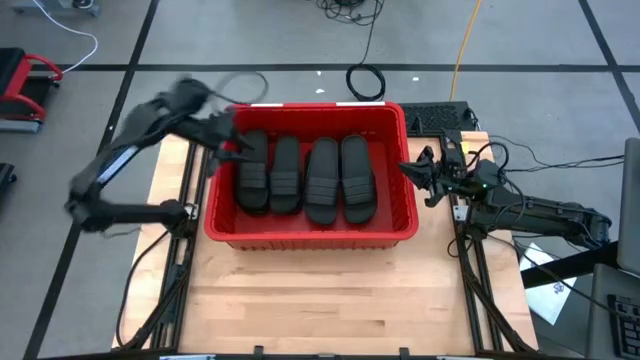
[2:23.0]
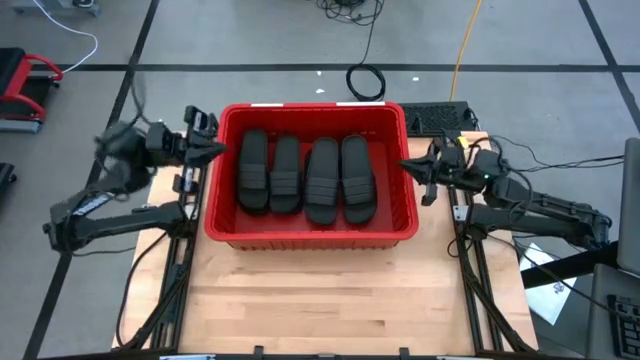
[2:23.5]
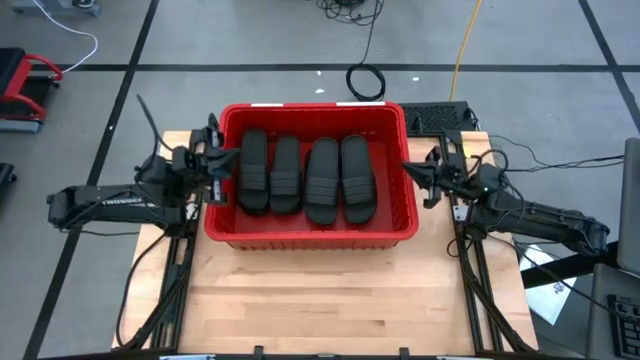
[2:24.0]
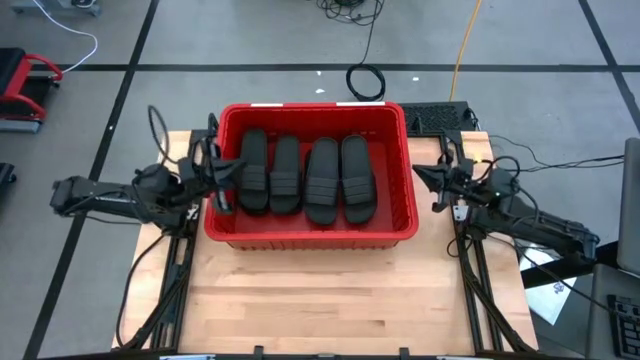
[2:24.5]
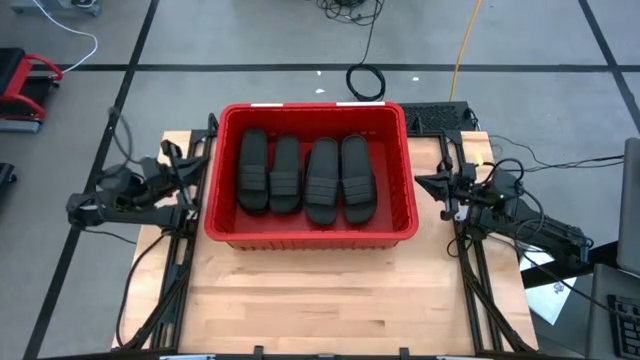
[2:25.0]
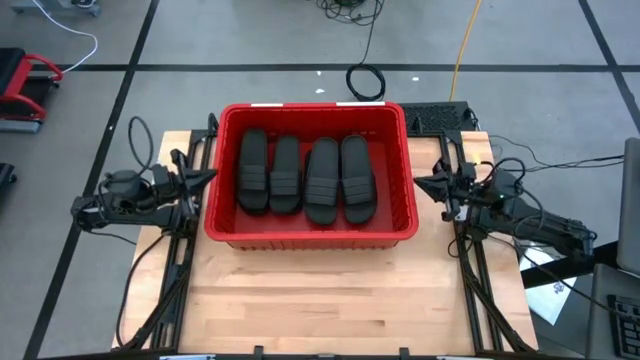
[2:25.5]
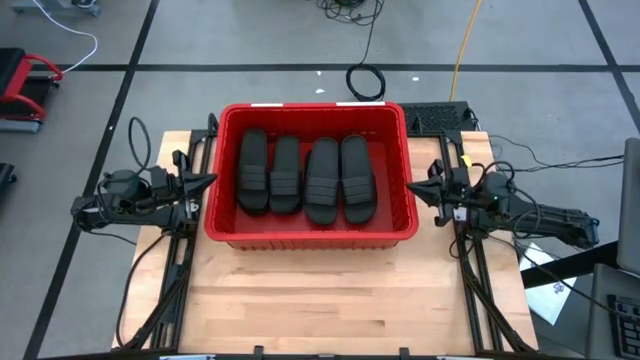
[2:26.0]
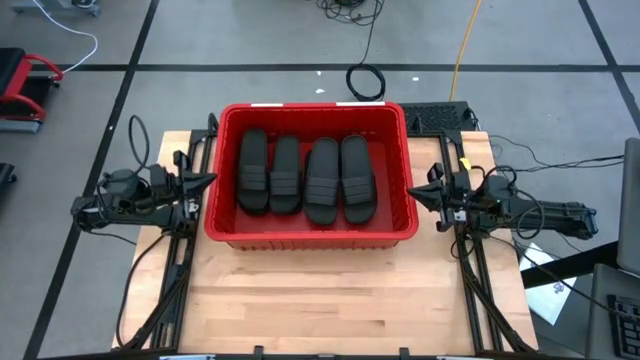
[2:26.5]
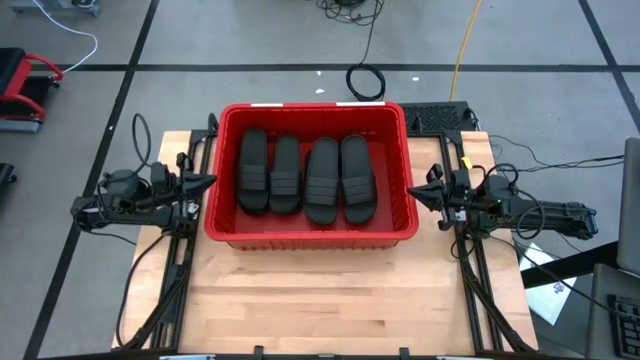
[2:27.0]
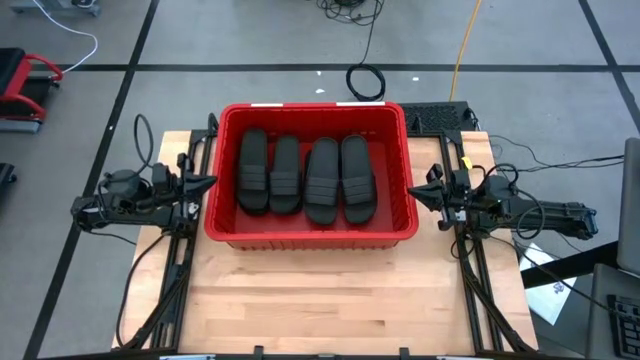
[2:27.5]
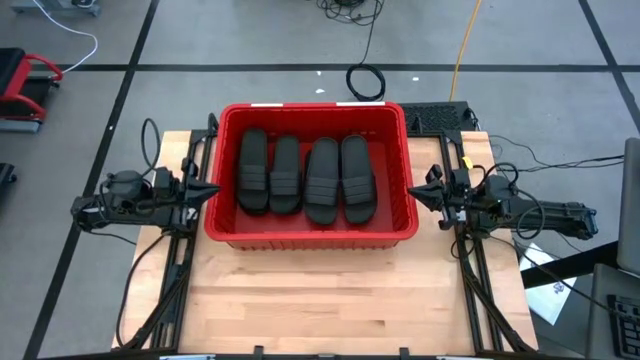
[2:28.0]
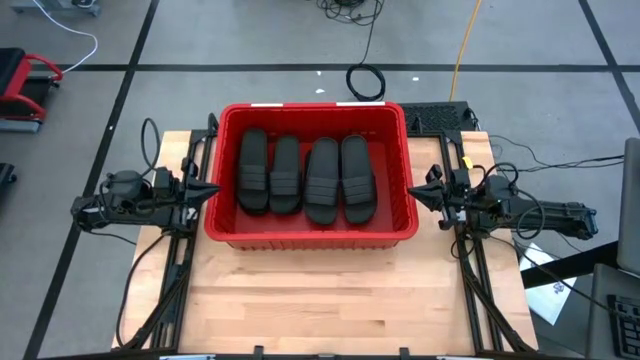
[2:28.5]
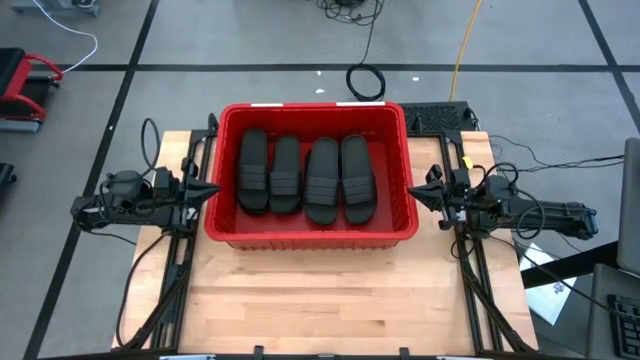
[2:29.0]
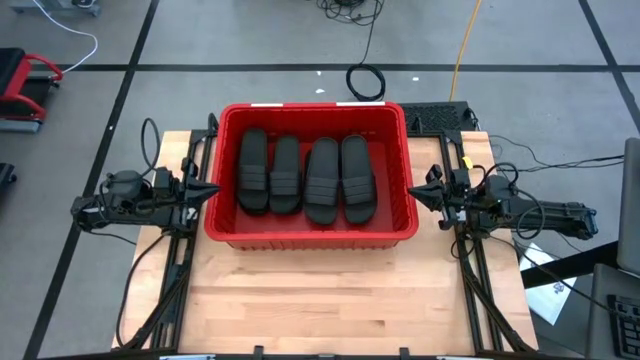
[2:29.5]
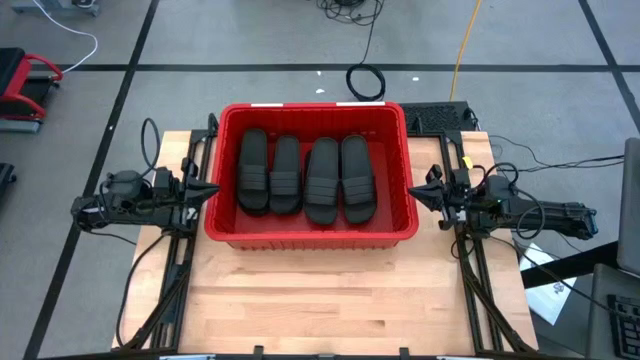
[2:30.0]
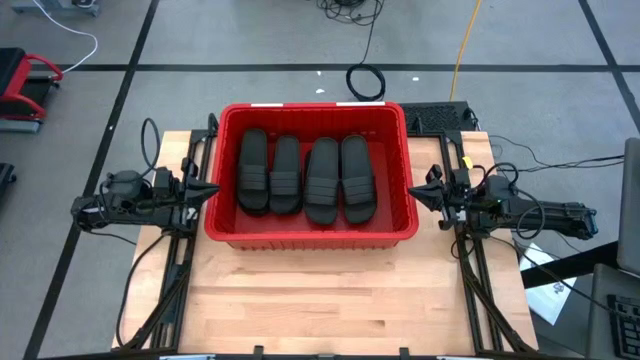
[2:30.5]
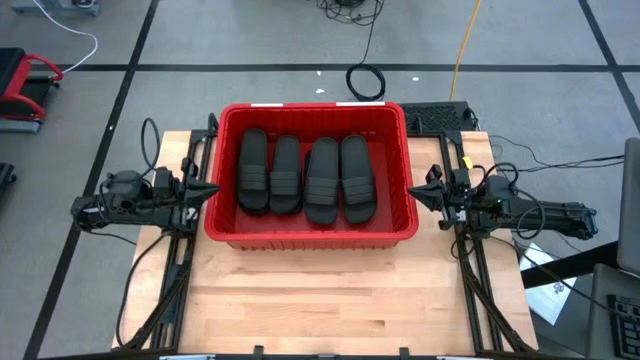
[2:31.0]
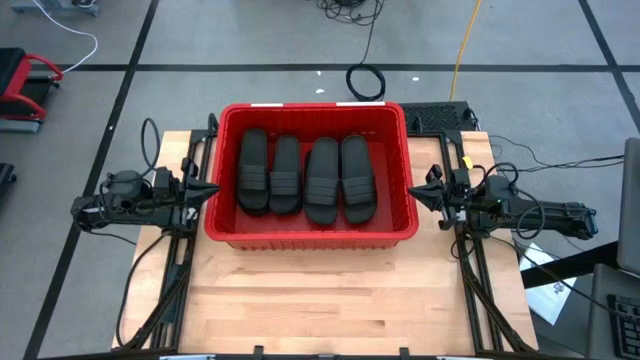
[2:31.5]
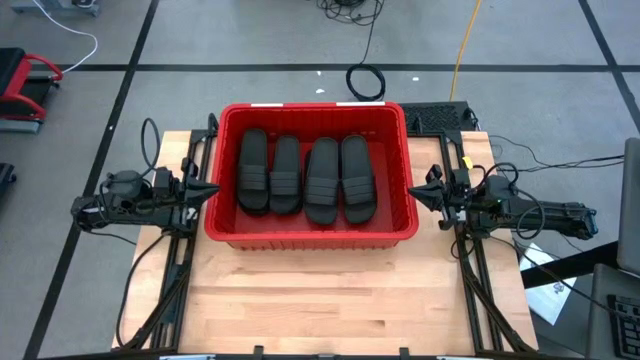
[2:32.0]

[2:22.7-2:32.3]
Task: Pick and place slides into bin
Return to Home Position

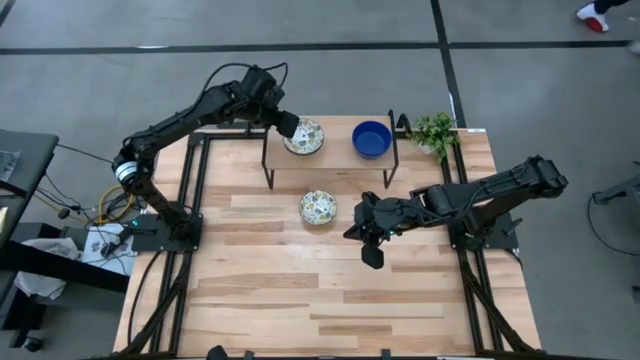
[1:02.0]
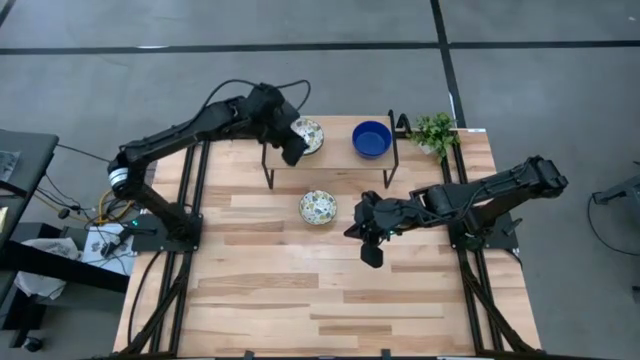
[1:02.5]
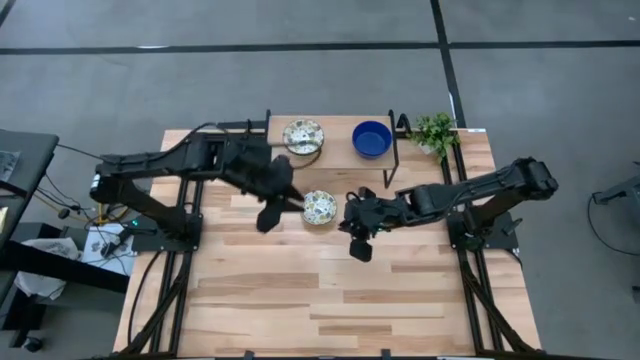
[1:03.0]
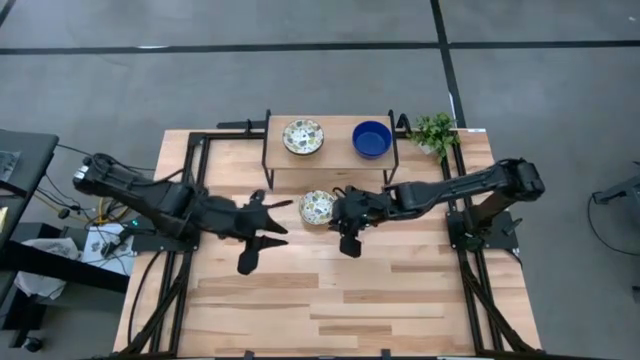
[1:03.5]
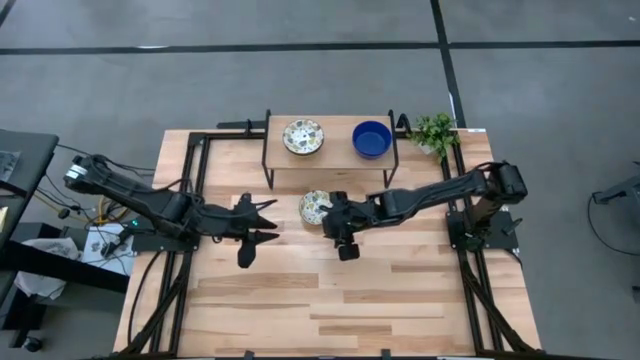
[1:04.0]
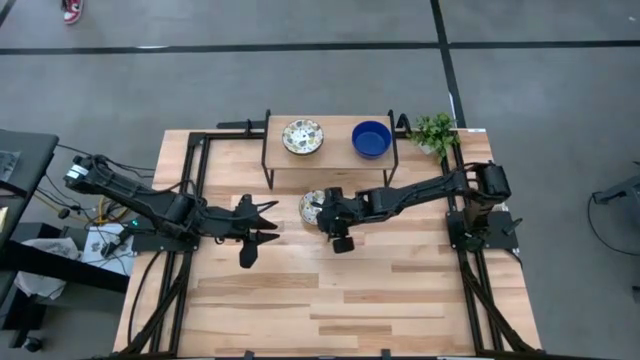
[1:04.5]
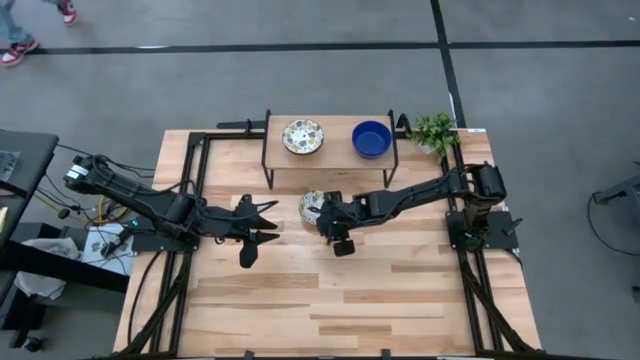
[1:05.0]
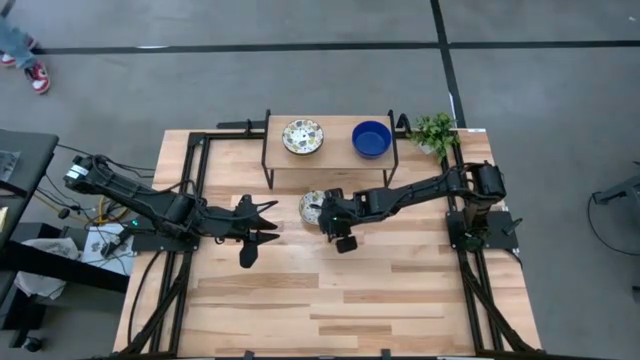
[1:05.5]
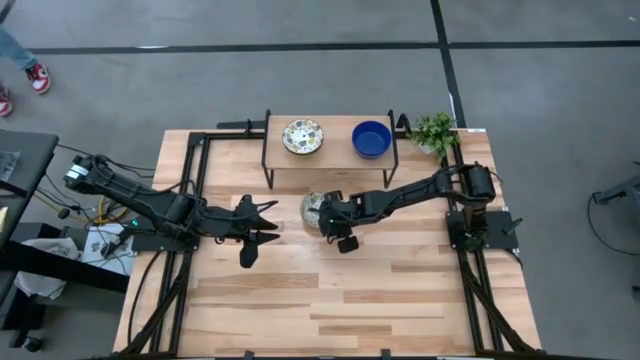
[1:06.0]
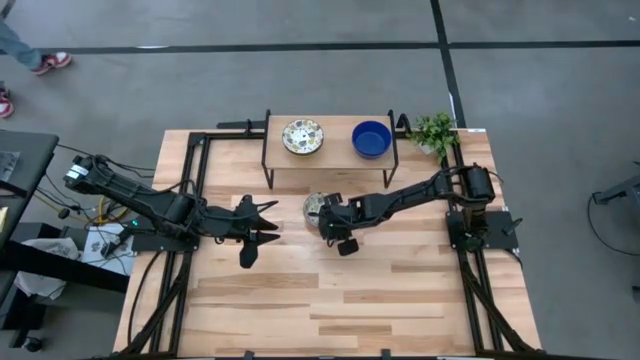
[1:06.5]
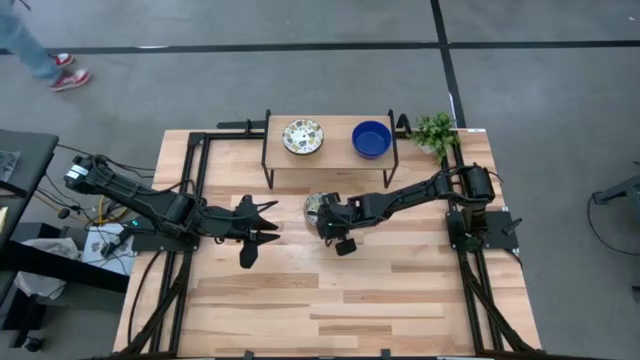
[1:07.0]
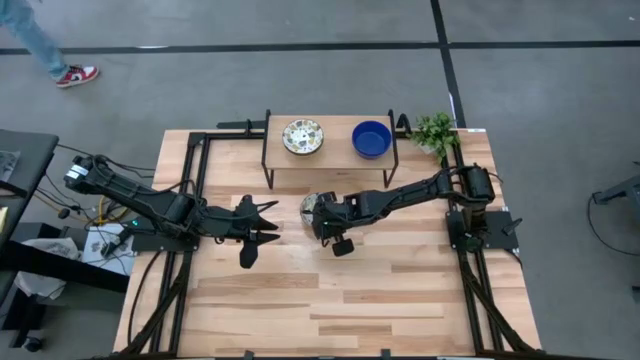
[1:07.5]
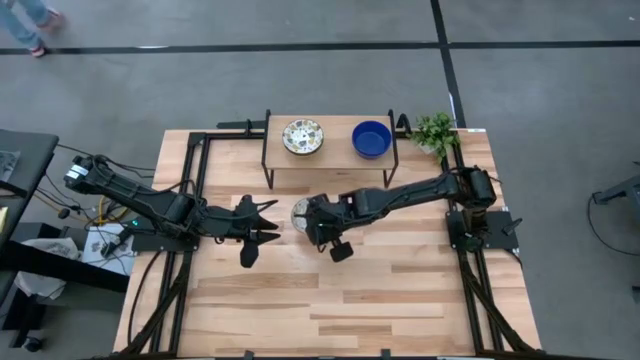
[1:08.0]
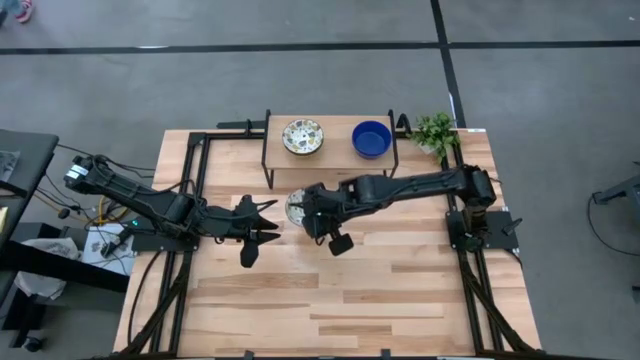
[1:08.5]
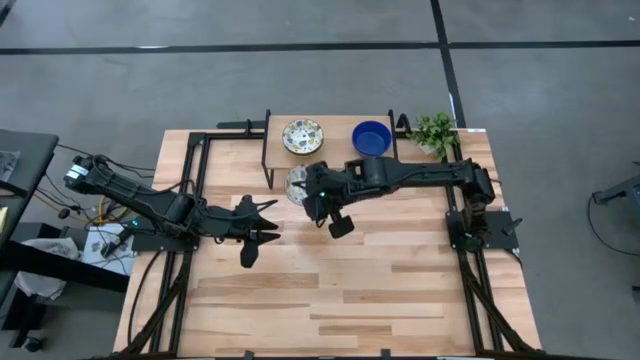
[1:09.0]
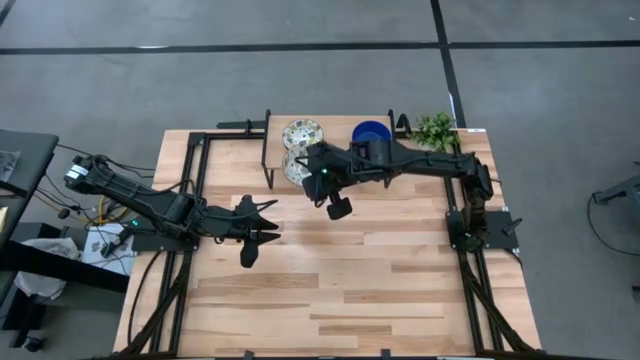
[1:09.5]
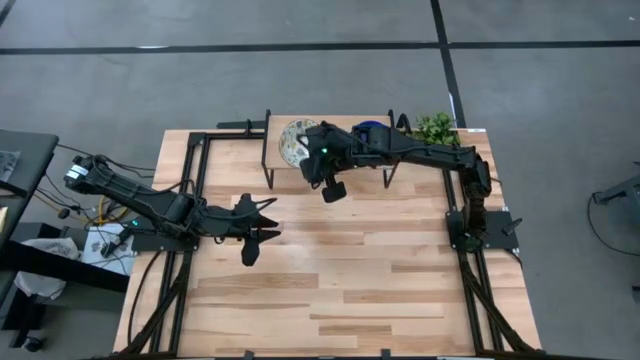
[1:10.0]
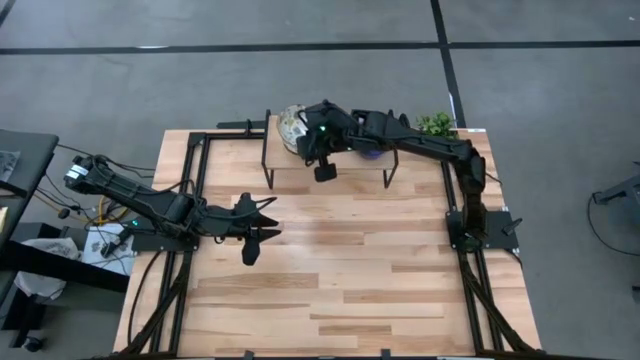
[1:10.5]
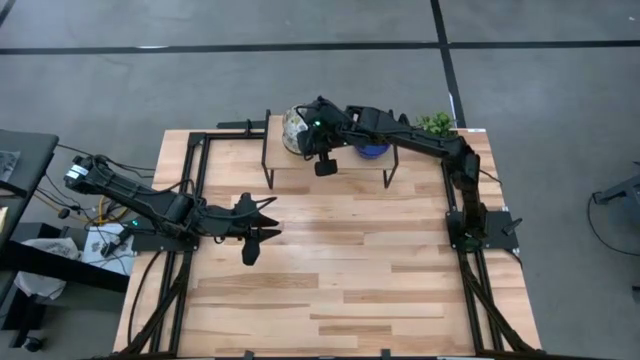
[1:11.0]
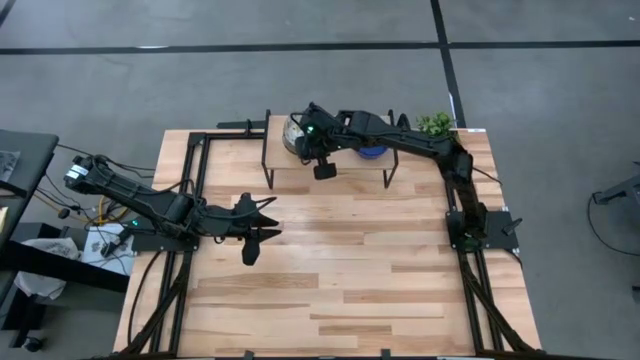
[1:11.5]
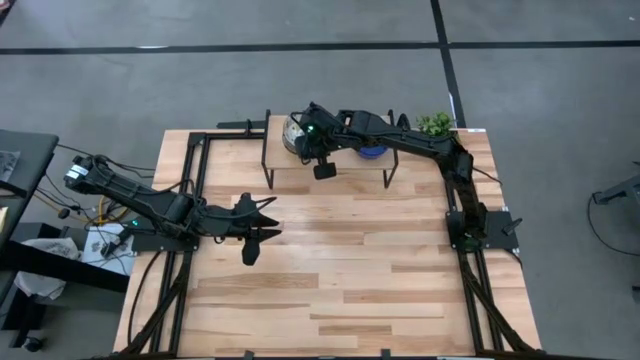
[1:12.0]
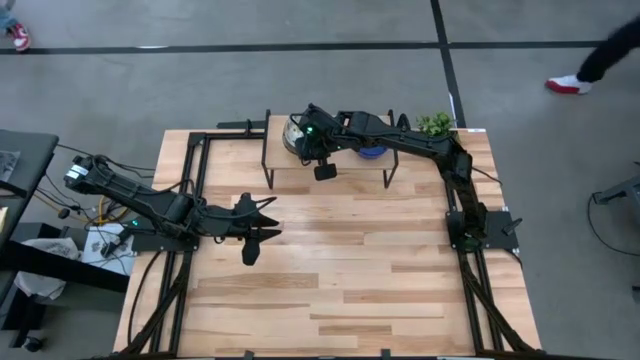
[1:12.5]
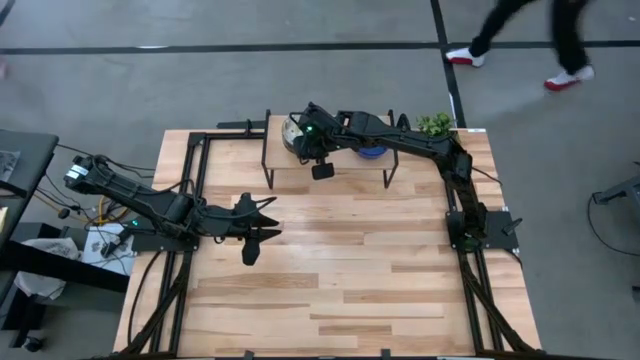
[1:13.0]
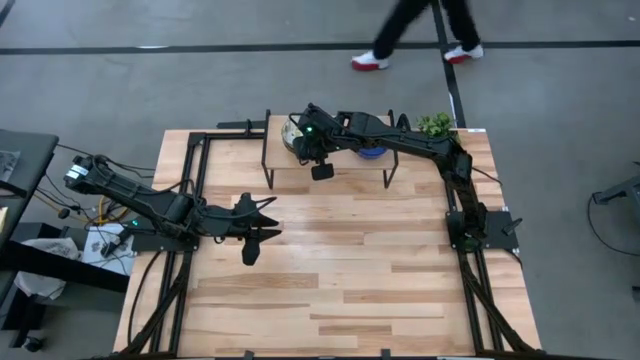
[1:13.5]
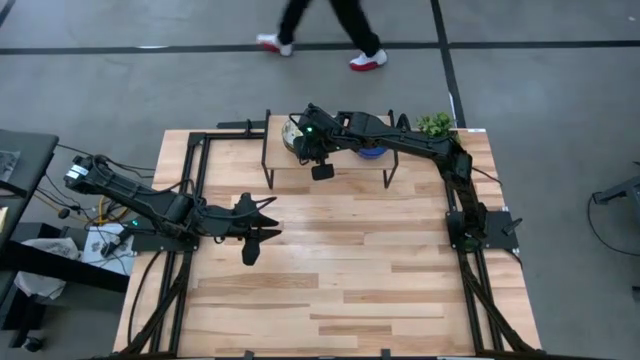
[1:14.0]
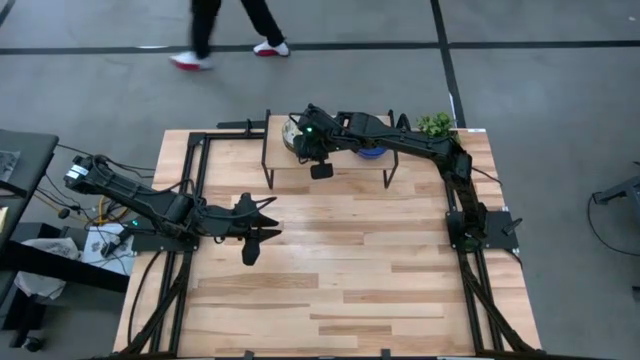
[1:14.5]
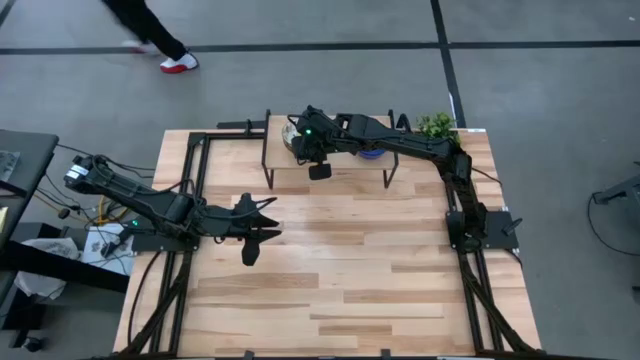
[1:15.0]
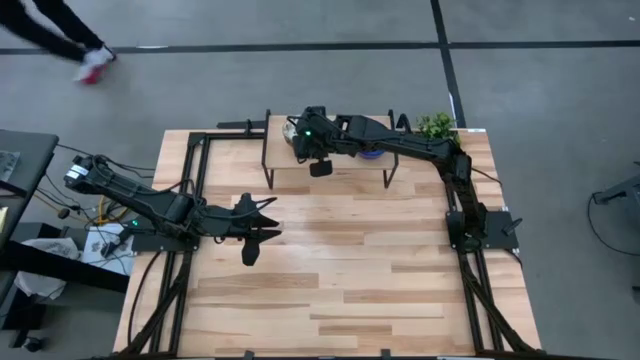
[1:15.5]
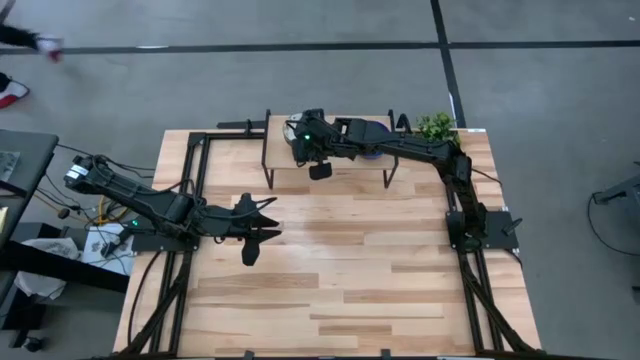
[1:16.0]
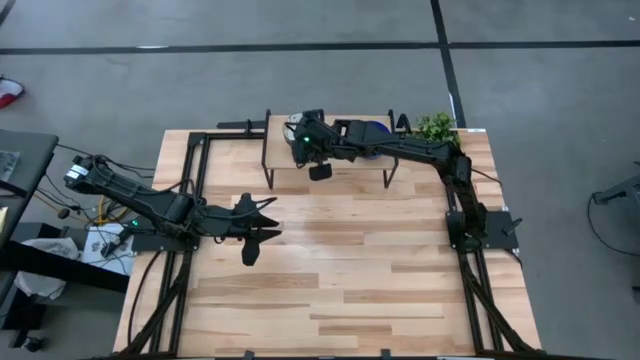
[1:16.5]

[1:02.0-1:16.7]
Task: Pick & Place Mini bowls
Stack the white patterned bowl on the stacked white patterned bowls on the shelf
